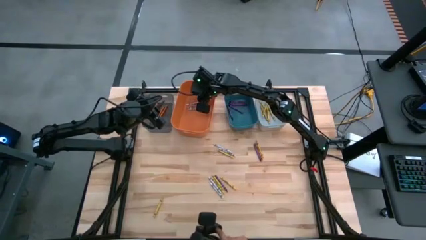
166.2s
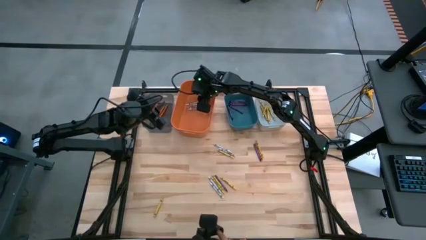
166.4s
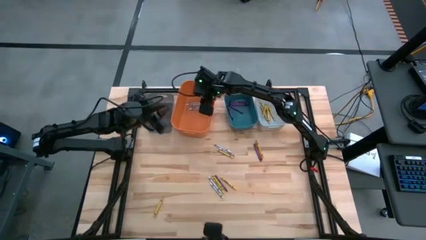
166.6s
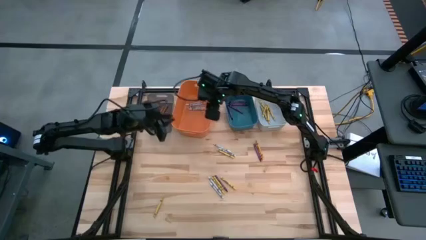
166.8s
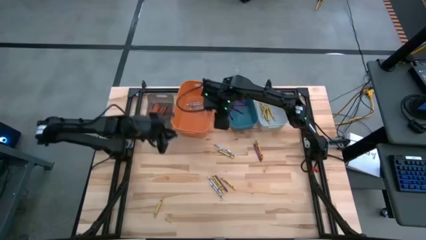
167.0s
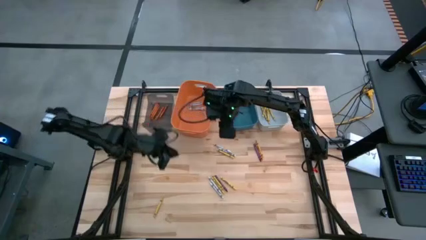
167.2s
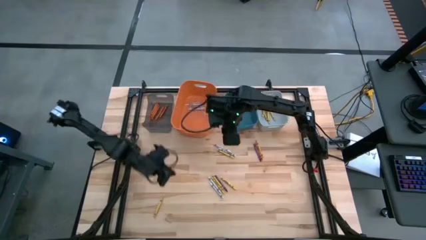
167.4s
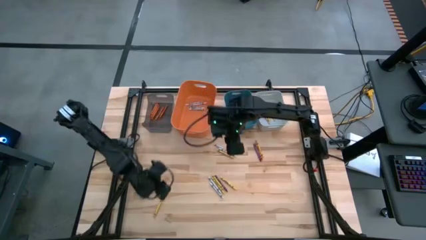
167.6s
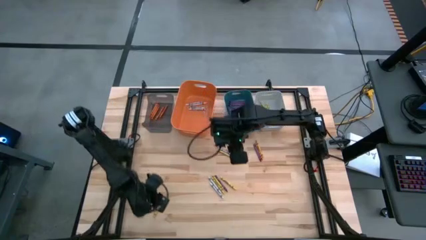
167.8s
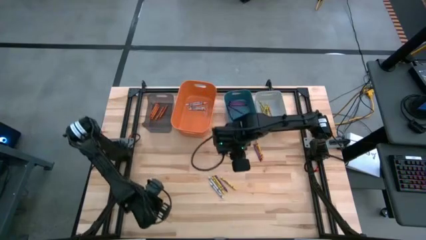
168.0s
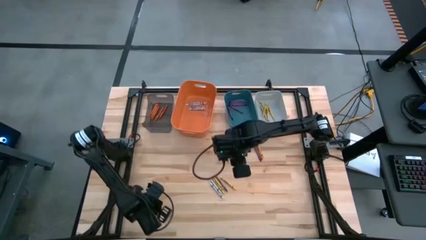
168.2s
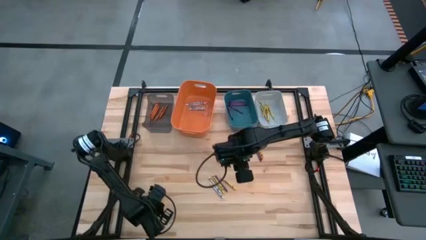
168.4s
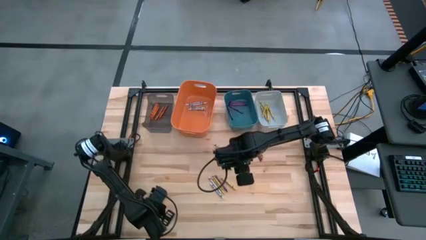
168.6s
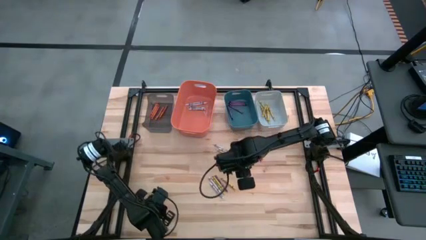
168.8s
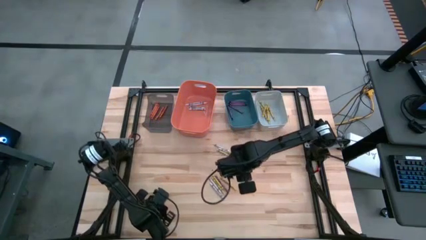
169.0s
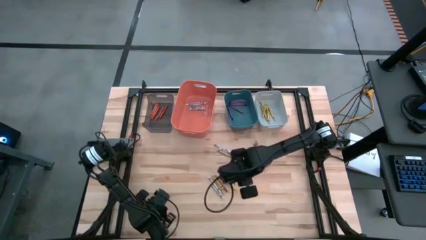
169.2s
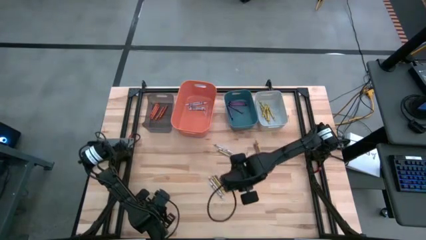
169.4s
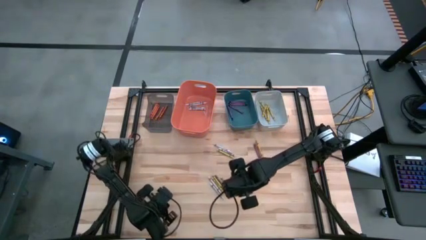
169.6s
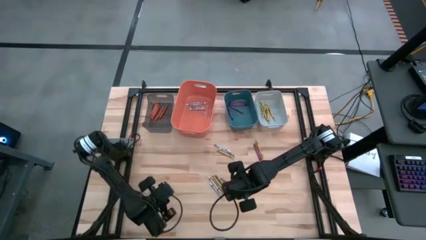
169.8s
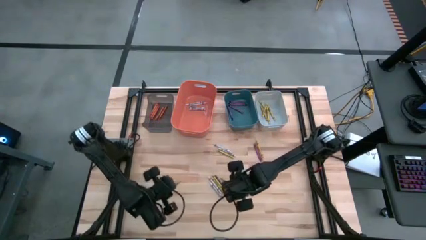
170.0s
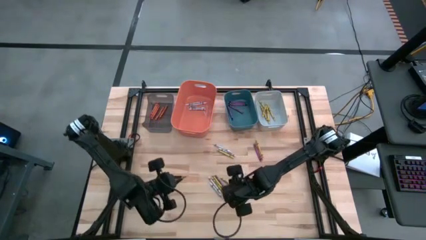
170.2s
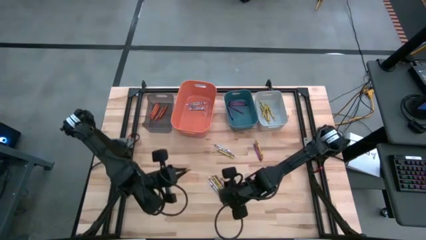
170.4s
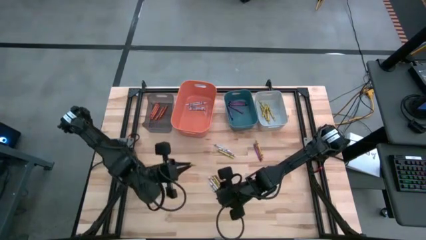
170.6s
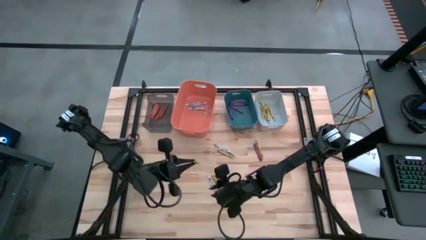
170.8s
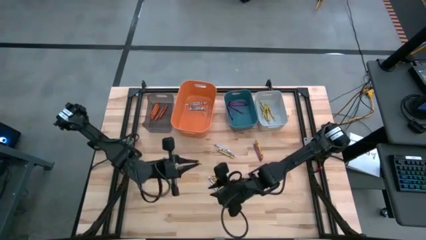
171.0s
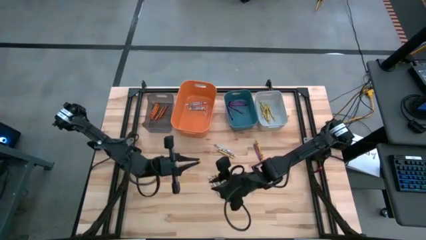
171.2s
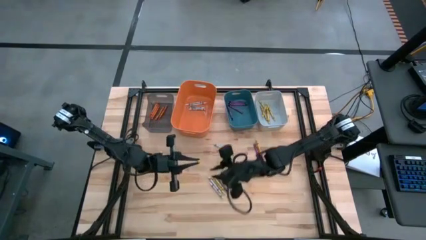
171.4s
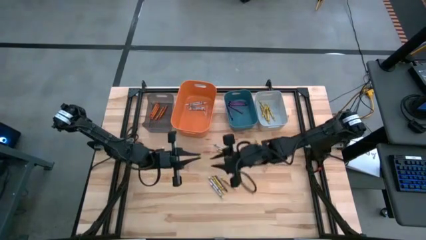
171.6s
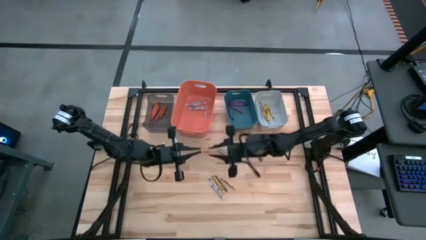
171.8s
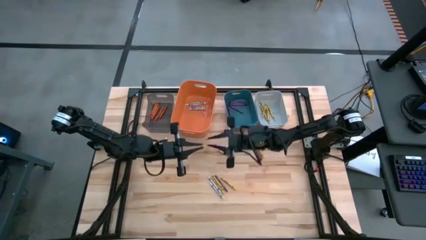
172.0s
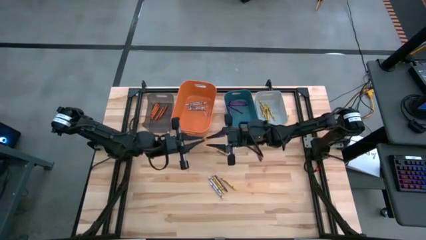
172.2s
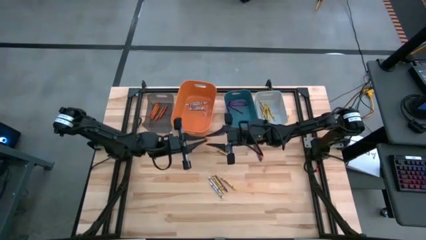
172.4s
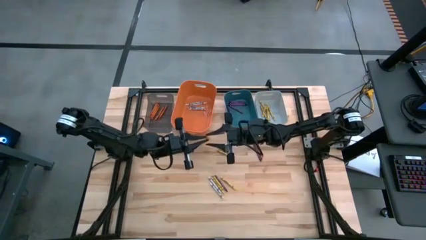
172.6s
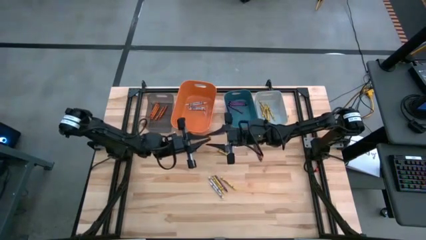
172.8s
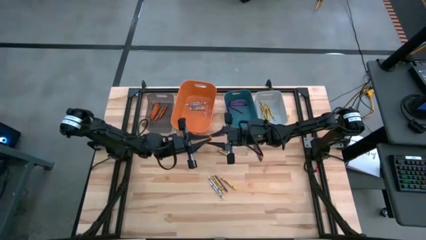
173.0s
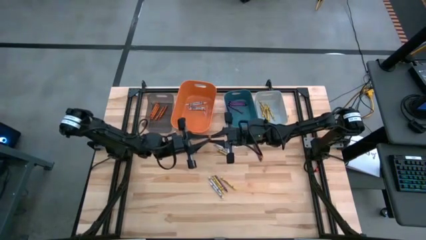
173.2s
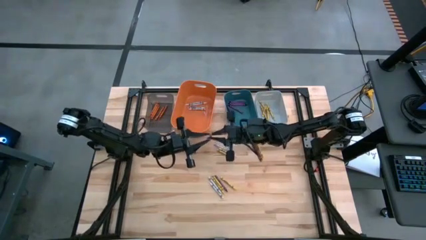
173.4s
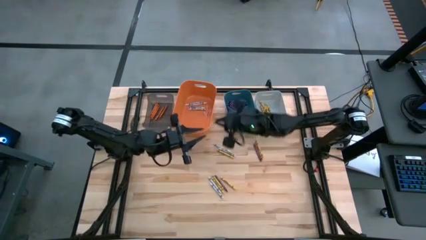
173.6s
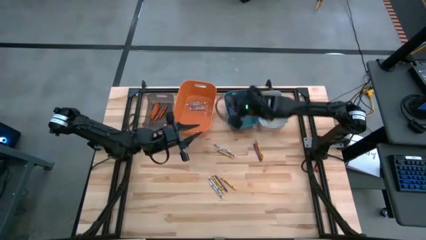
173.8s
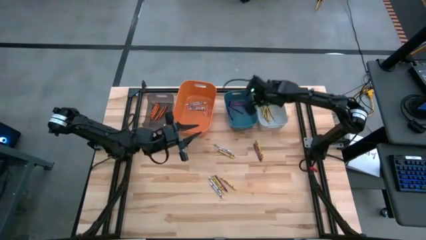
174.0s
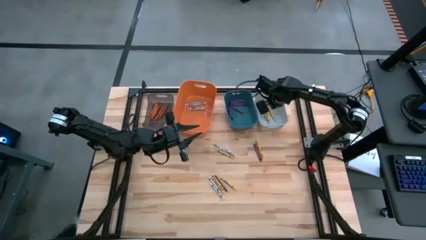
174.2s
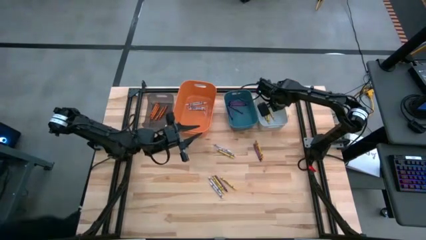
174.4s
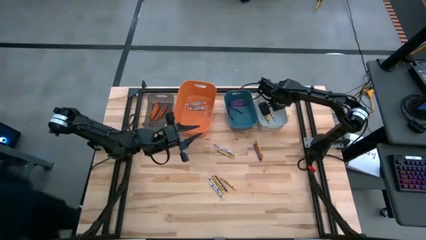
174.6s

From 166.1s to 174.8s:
Task: Sort crayons
Put the yellow crayon into the white bin

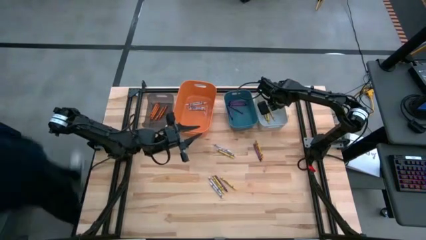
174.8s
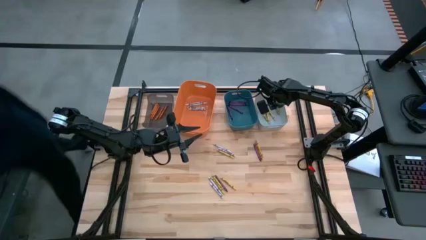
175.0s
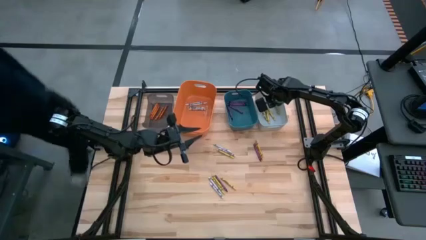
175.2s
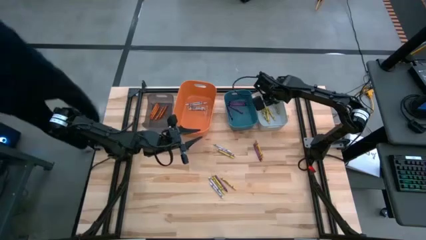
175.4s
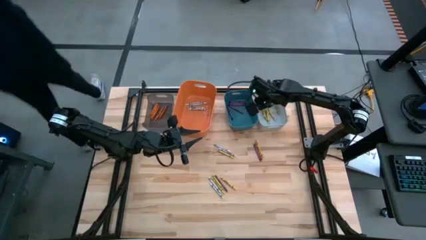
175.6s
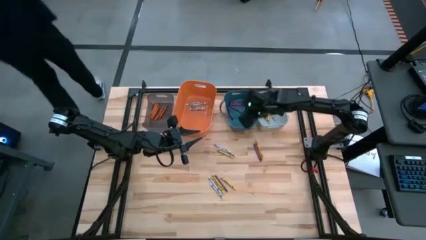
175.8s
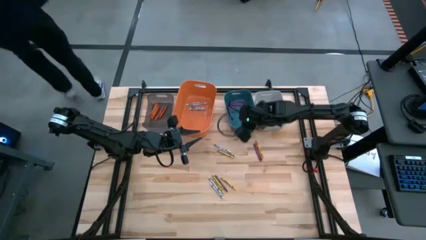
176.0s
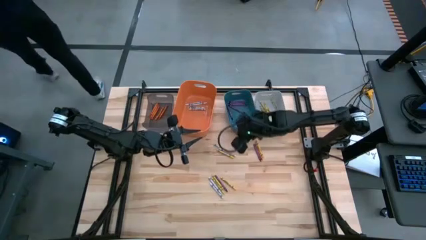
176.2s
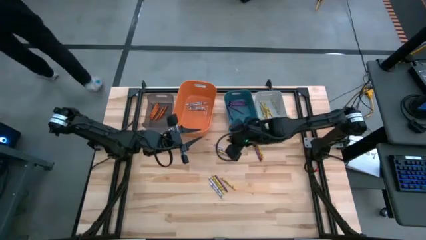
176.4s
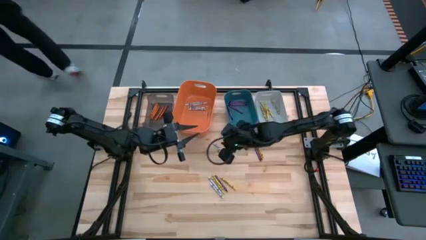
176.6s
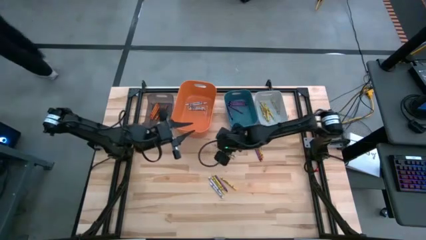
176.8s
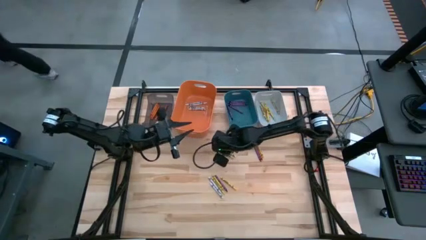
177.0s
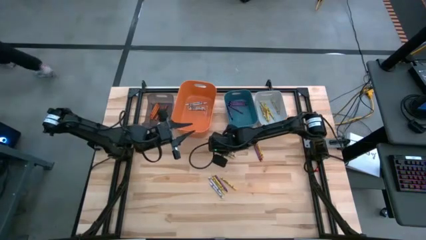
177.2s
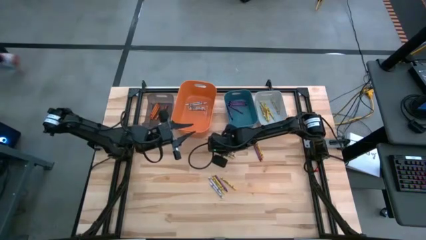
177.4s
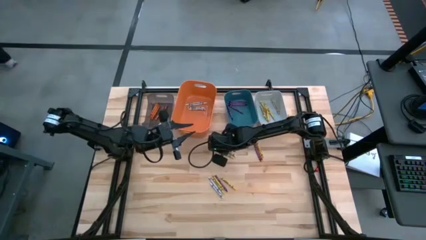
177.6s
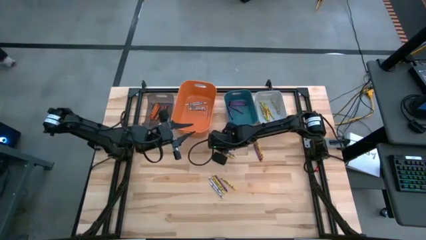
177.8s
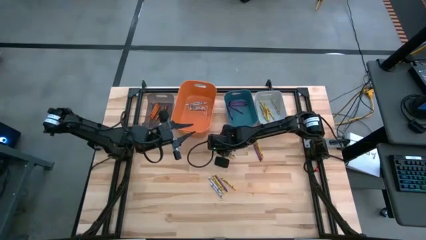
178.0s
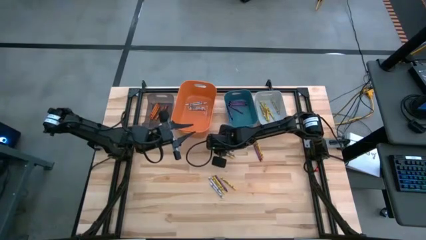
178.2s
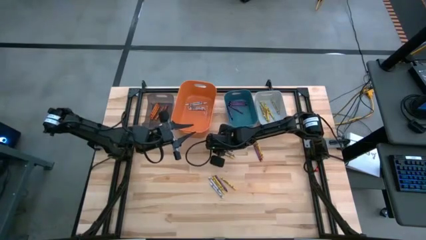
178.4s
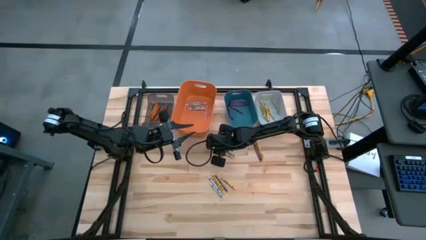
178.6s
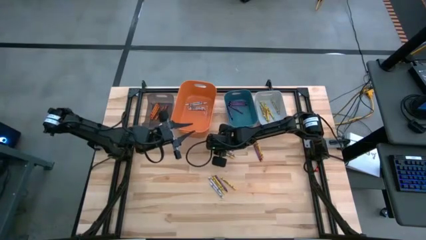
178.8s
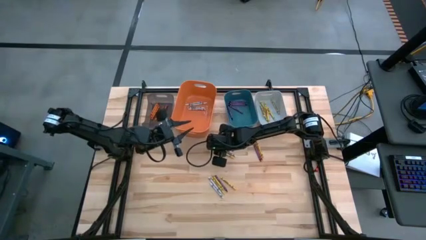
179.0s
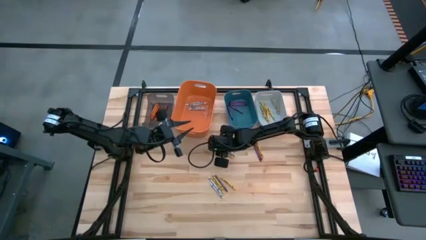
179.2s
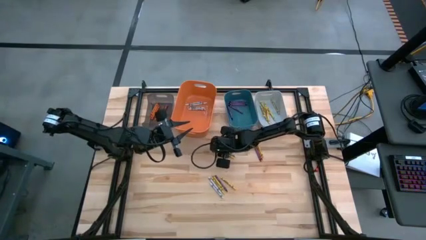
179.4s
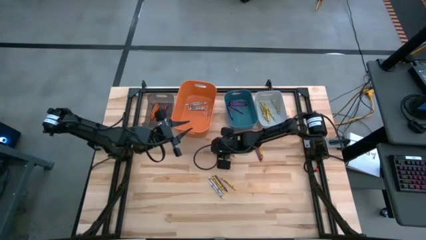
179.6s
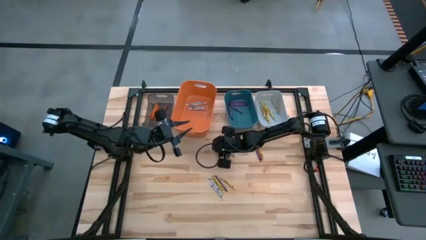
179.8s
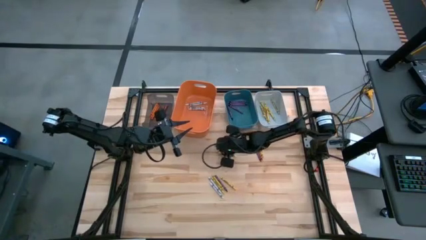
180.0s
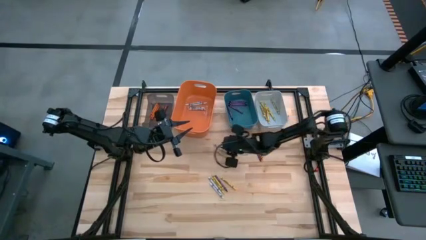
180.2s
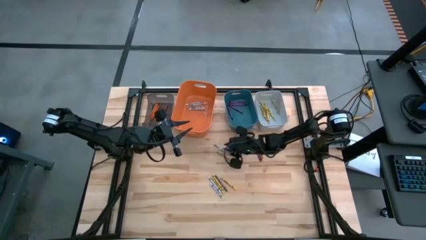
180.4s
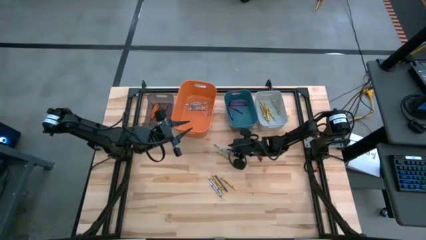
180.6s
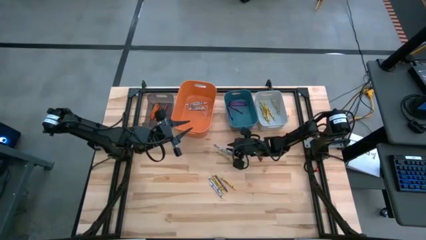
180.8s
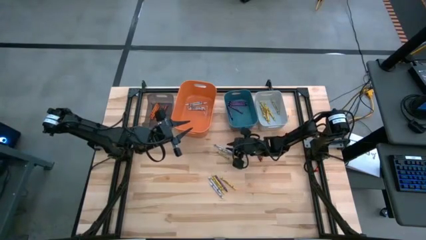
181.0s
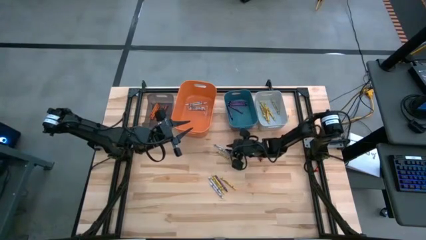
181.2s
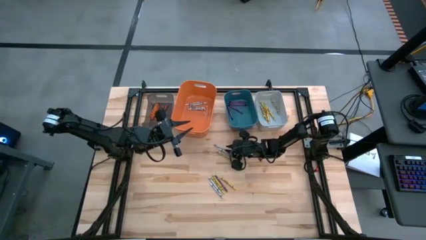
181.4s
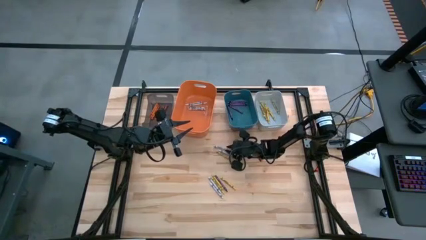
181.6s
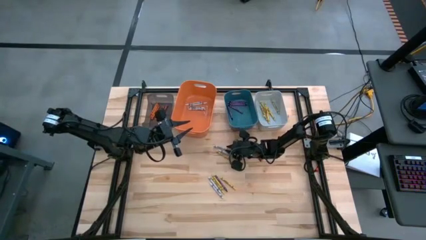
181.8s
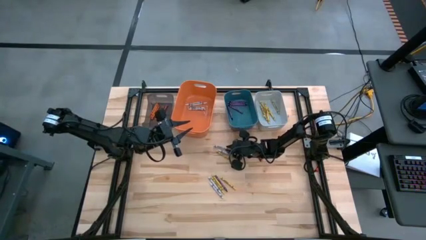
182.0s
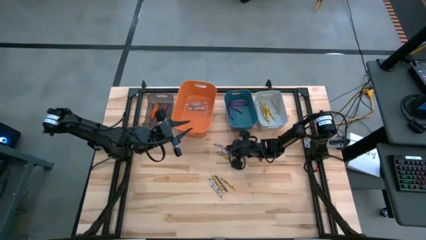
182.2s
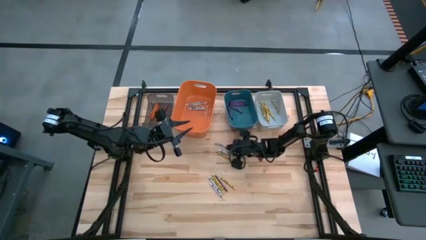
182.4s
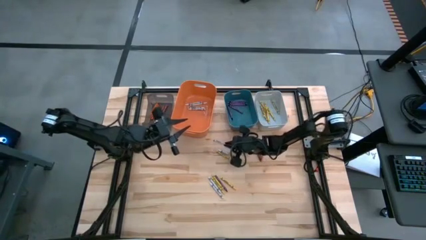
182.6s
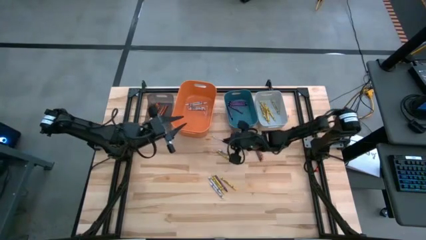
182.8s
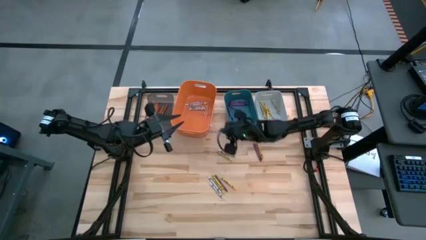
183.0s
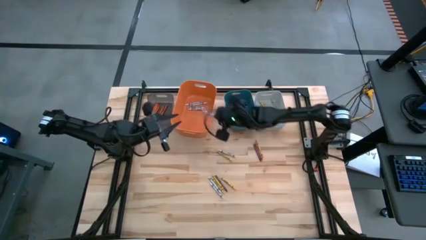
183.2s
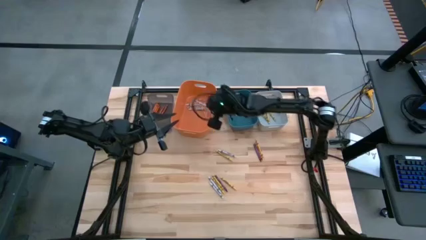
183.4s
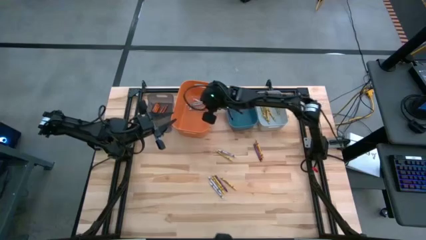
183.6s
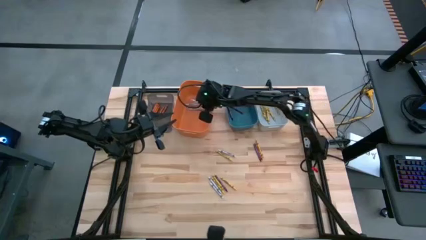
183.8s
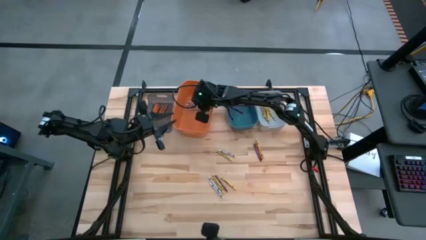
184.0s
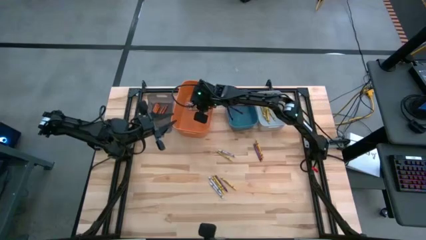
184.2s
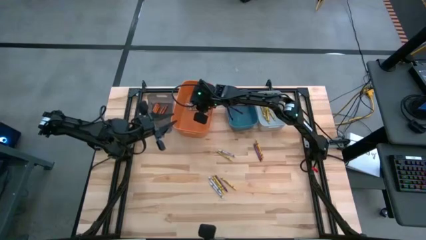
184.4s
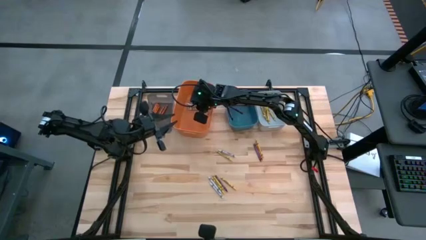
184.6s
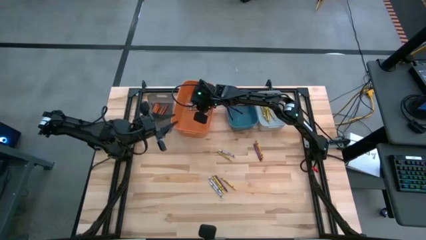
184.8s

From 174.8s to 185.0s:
Put the white crayon into the orange bin
